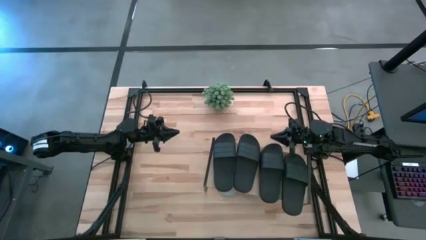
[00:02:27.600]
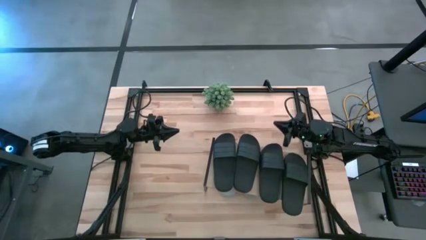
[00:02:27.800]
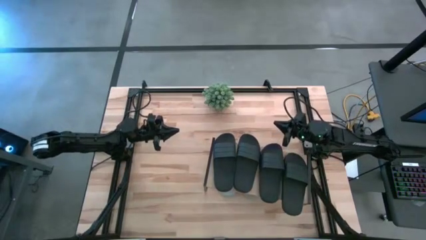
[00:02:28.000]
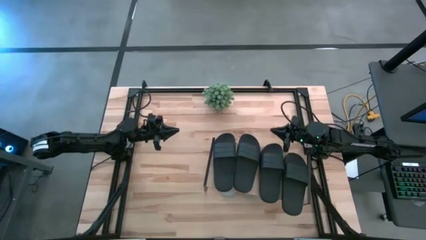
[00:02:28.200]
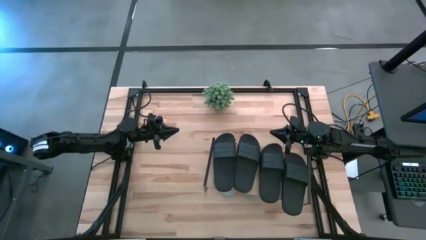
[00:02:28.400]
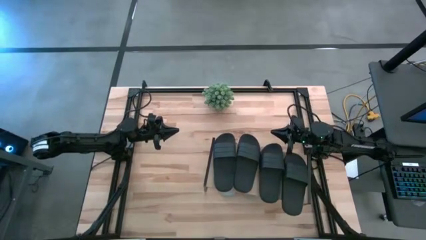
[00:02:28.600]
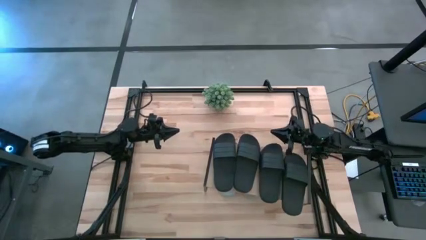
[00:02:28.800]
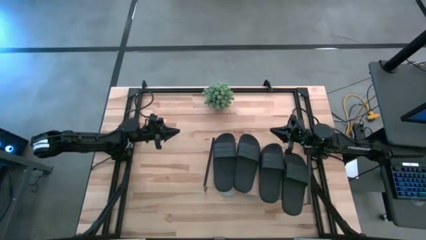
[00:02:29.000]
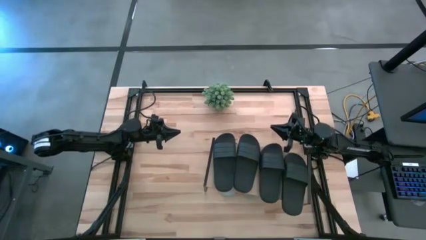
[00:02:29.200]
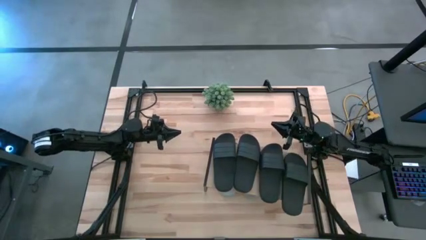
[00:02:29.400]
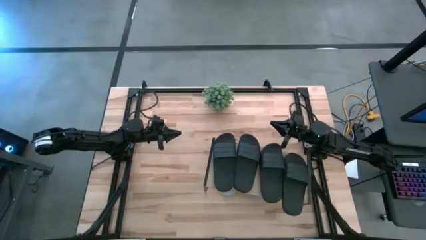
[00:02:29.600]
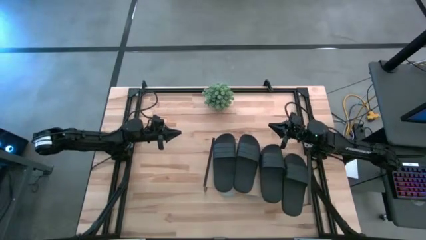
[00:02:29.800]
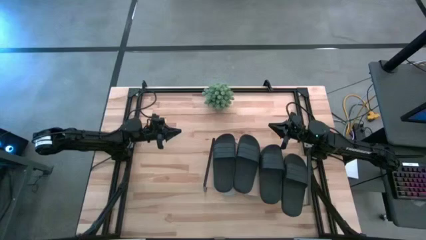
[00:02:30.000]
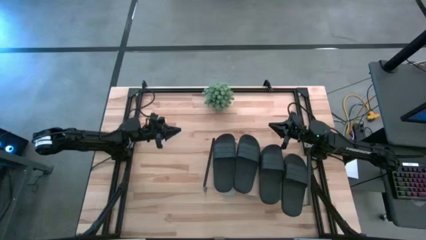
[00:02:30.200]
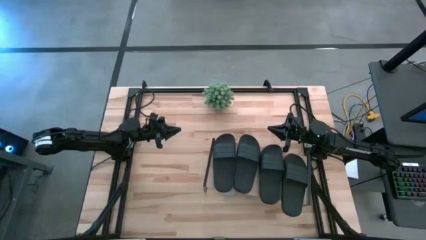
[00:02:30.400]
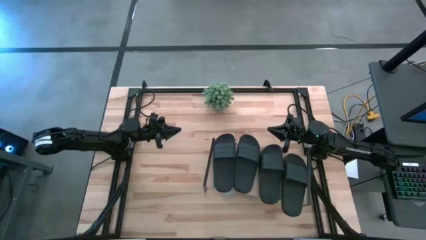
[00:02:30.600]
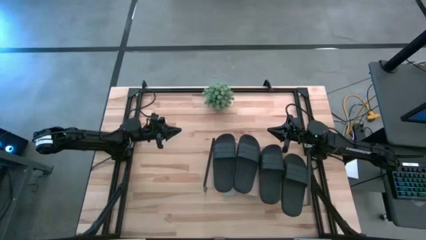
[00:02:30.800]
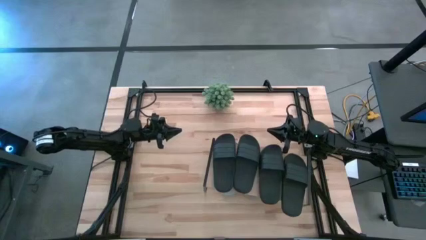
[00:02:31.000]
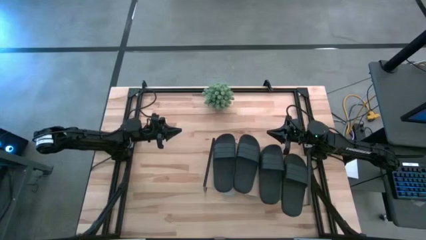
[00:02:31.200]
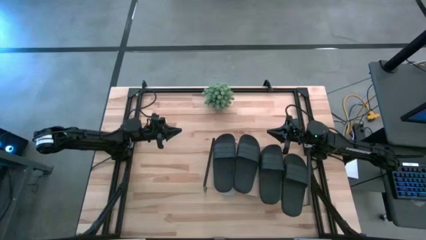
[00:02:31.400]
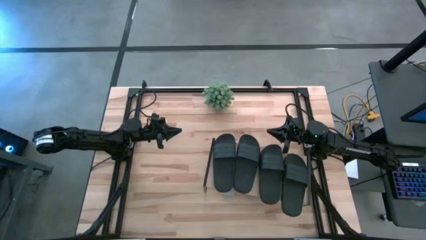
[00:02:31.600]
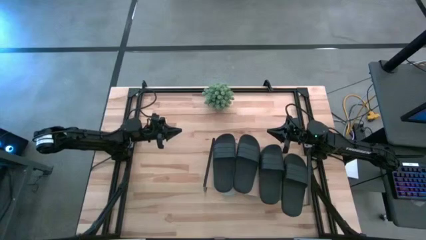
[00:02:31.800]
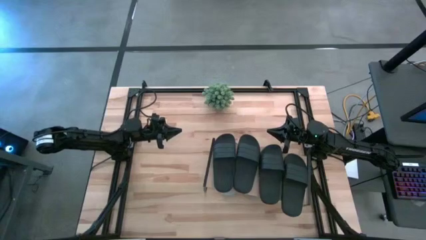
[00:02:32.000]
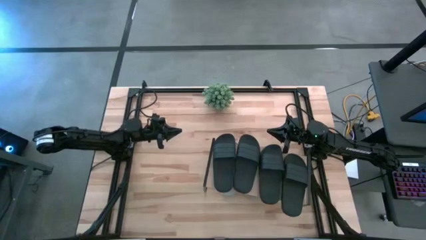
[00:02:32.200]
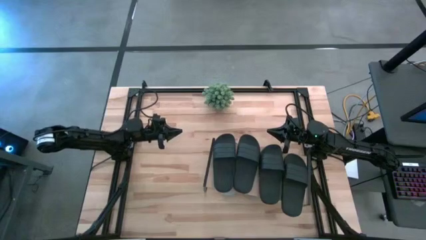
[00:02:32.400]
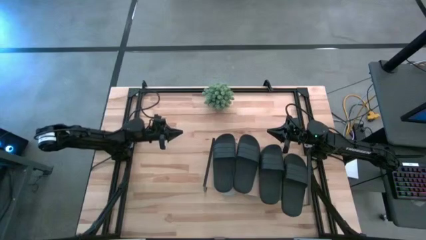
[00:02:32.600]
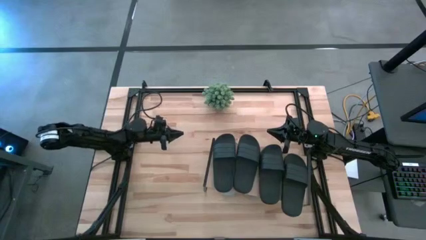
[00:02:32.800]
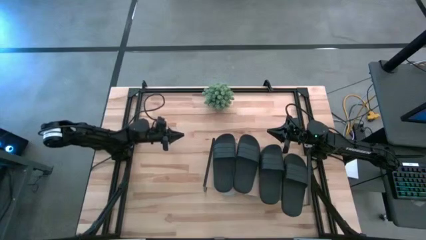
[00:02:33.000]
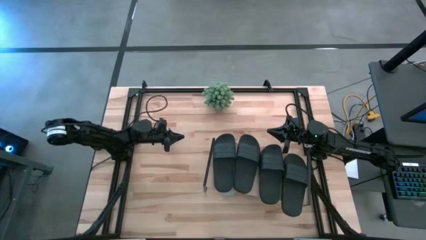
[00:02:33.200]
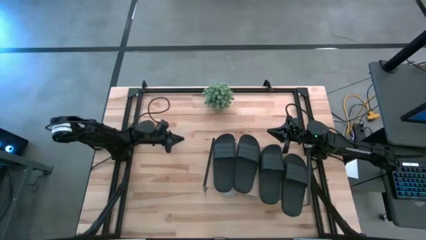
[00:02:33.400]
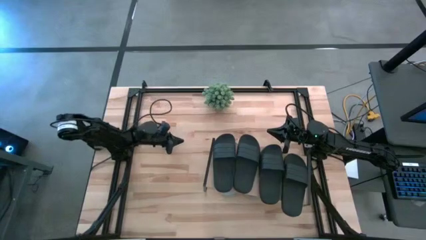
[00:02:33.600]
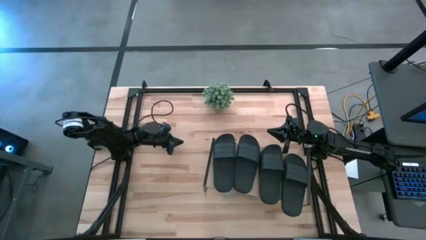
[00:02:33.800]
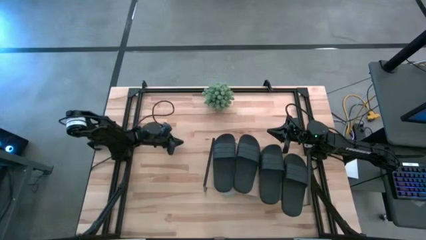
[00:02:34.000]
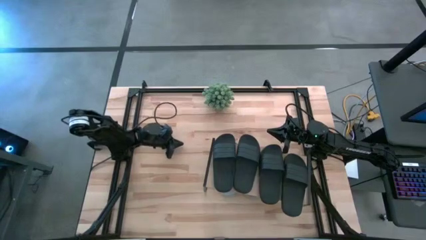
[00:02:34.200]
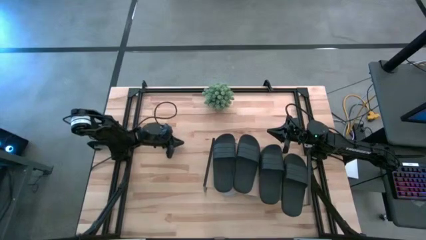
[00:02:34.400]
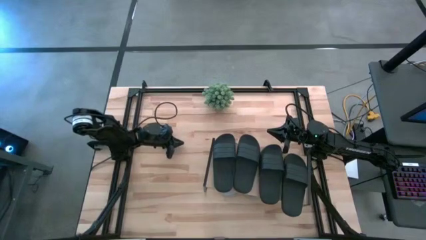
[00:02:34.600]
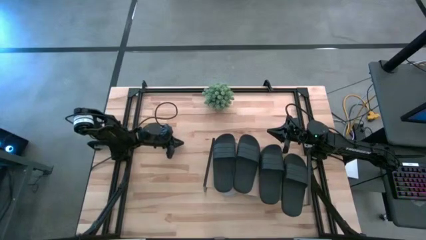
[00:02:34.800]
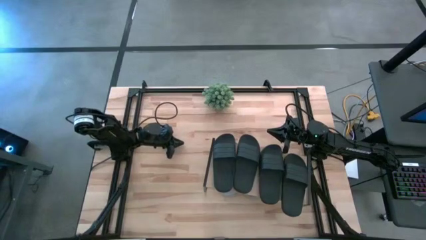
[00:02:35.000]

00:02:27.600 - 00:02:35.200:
Task: Pick and place slides into the shelf
Return to Home Position
